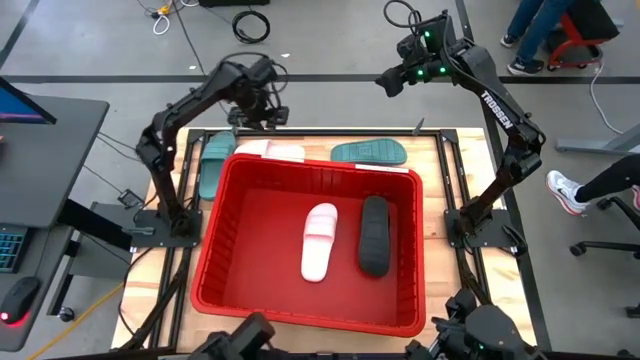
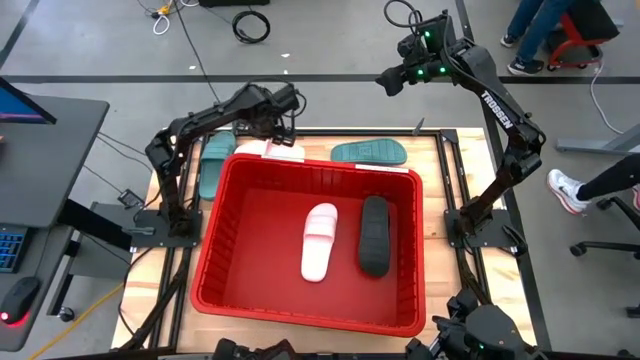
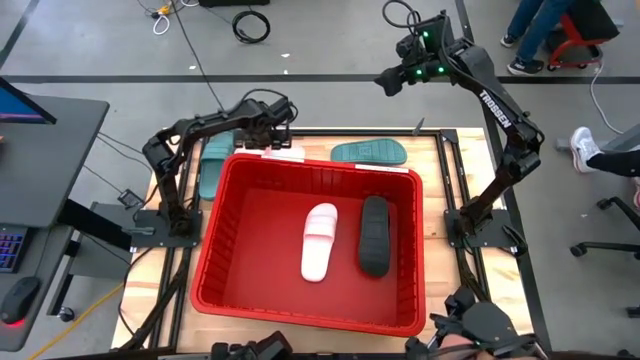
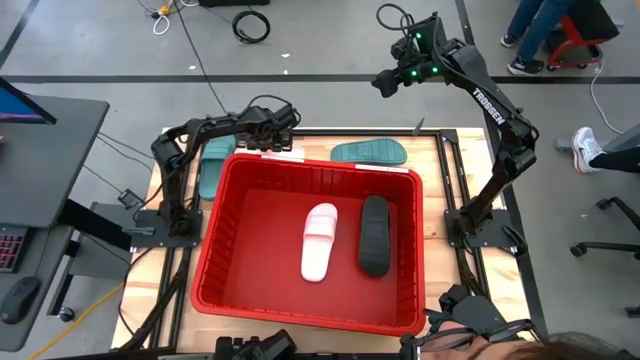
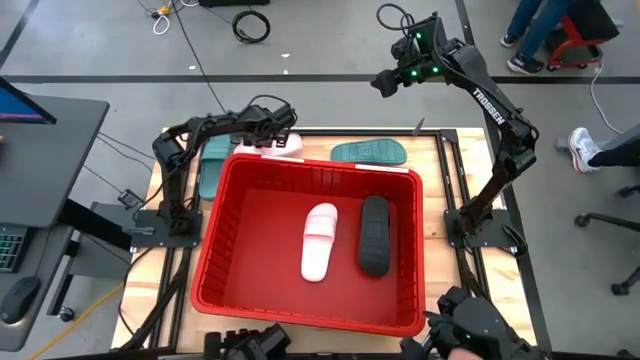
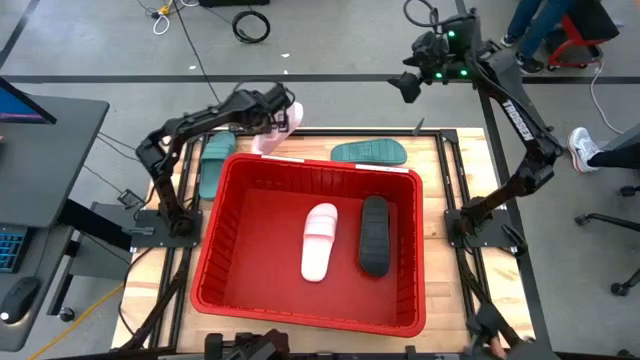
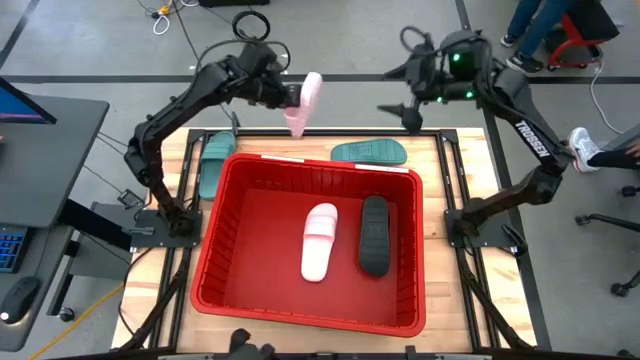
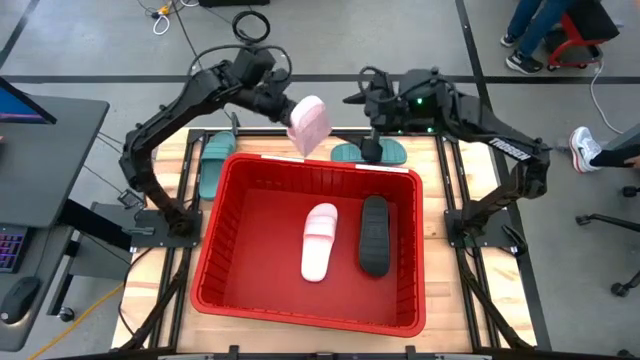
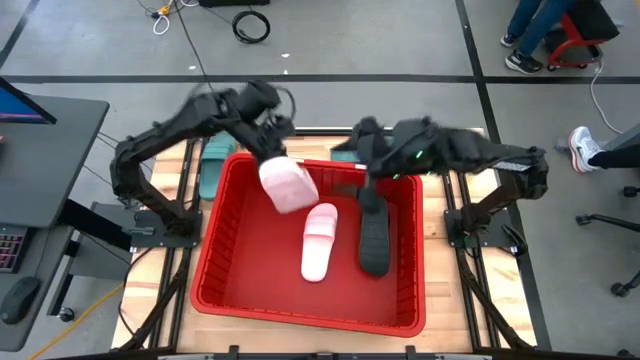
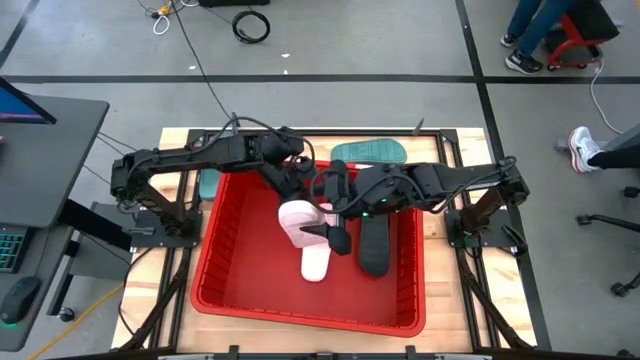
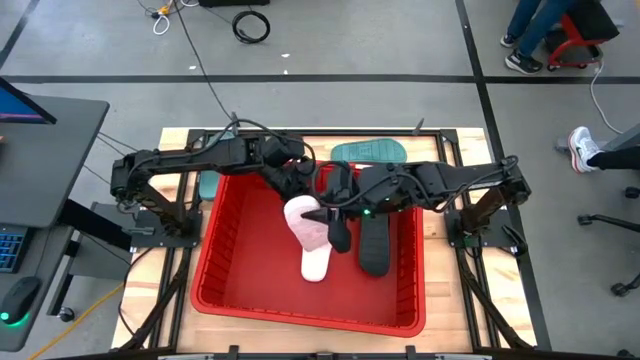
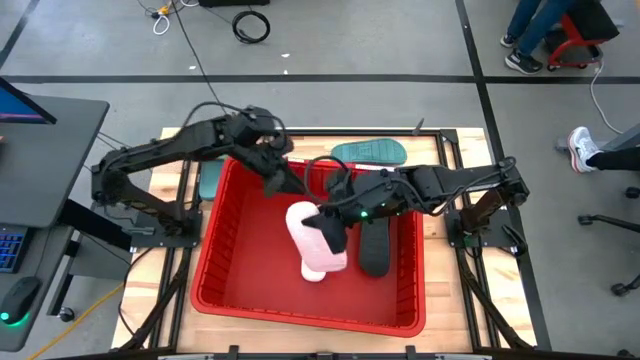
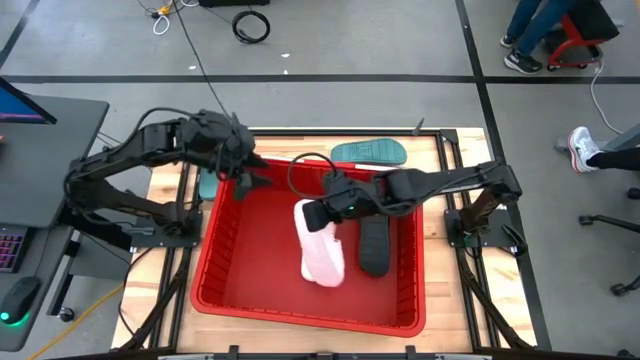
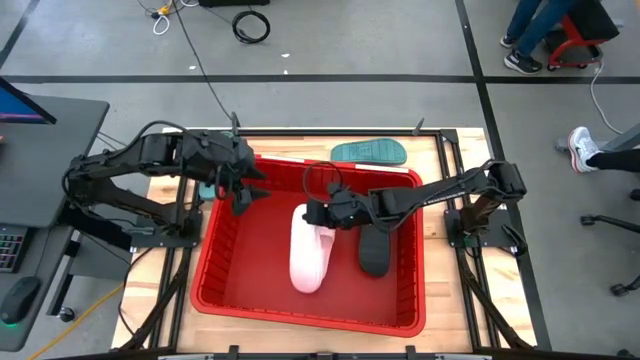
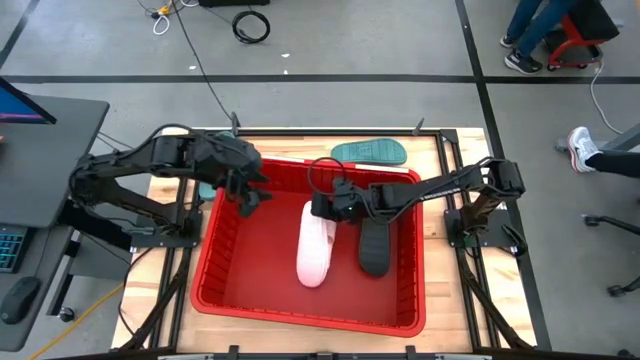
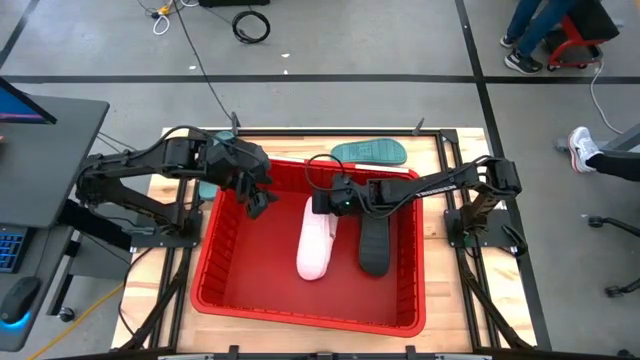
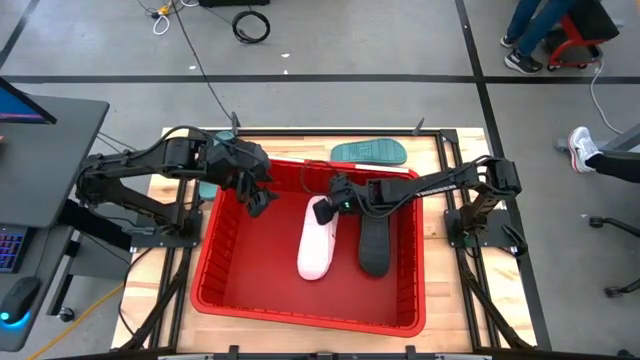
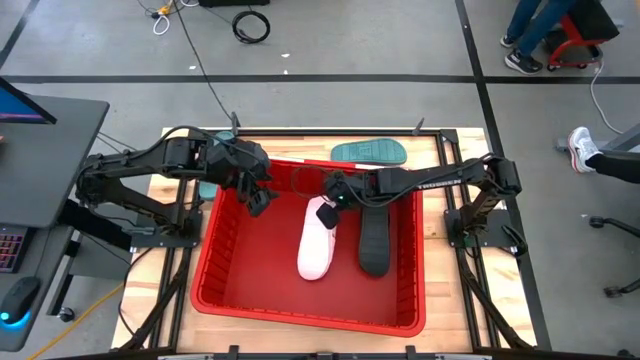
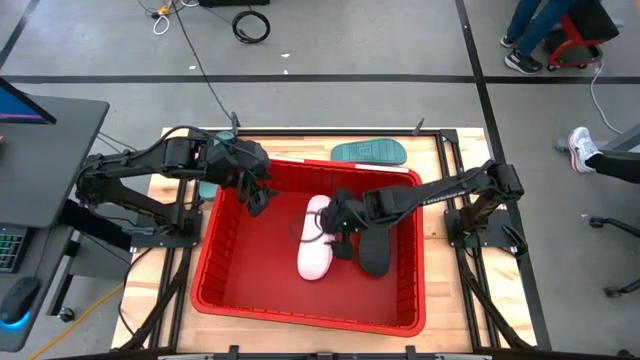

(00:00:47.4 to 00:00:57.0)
Task: Pick and place slides into bin
Stack the pink slide on top of the pink slide in the red bin

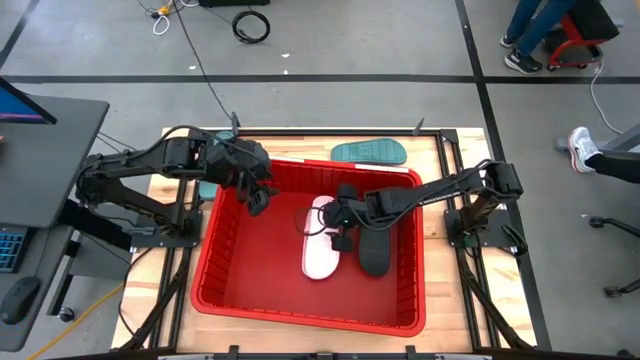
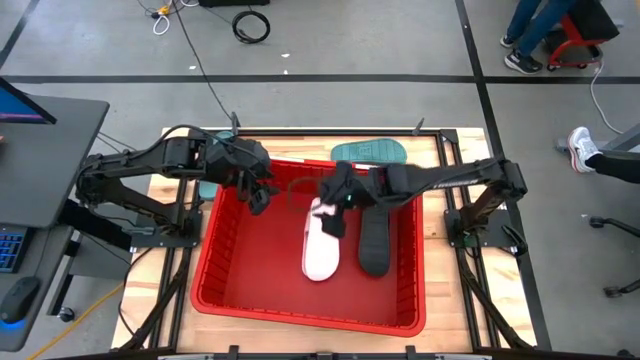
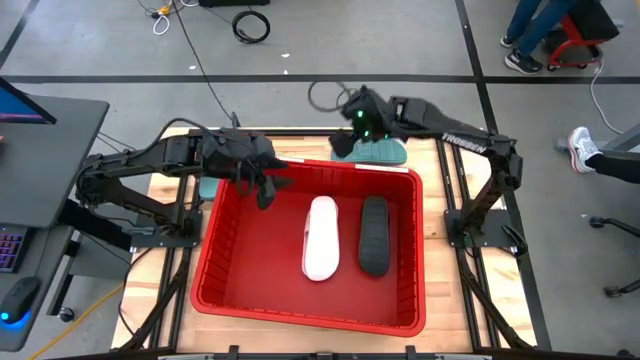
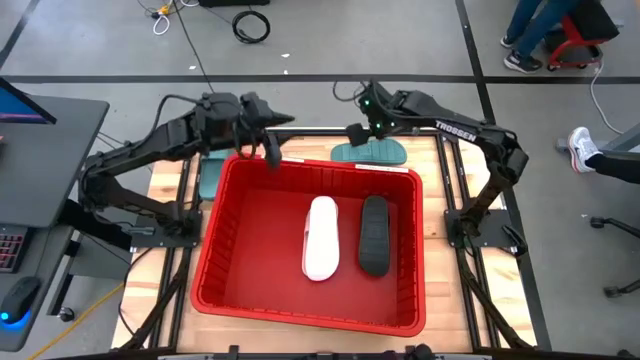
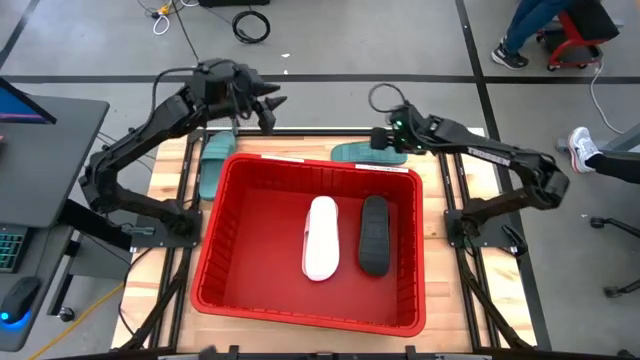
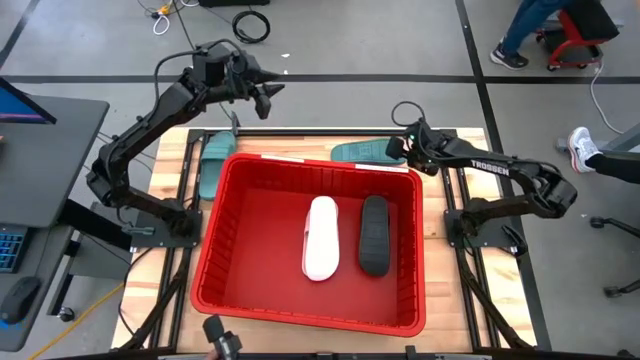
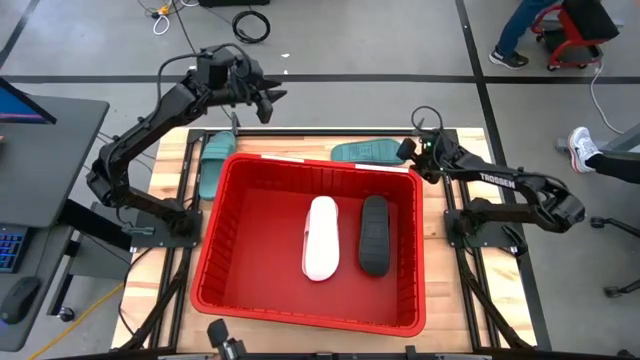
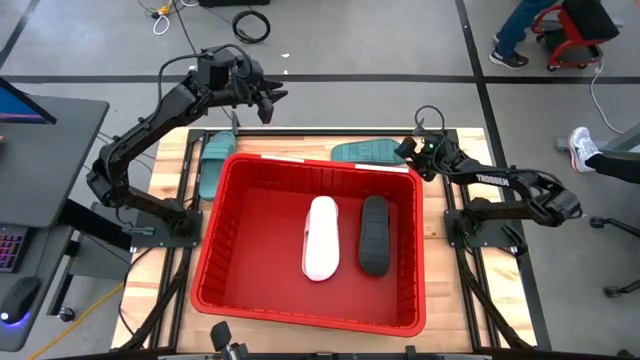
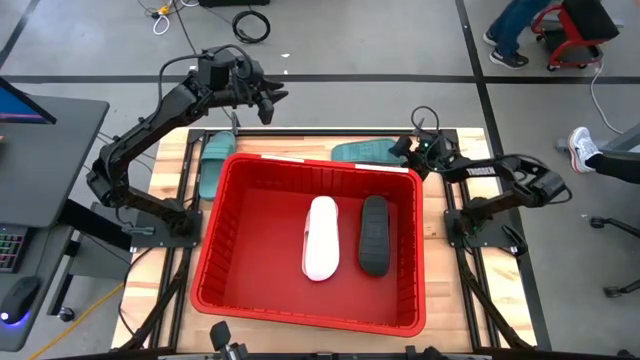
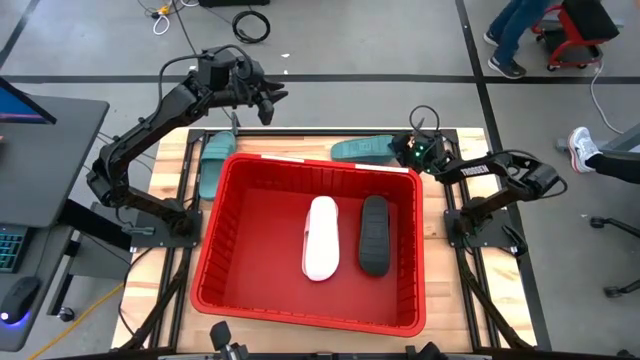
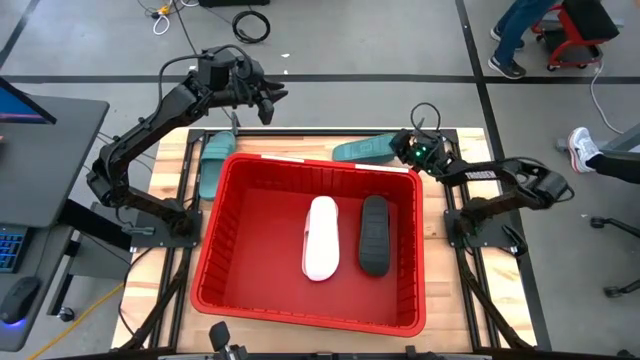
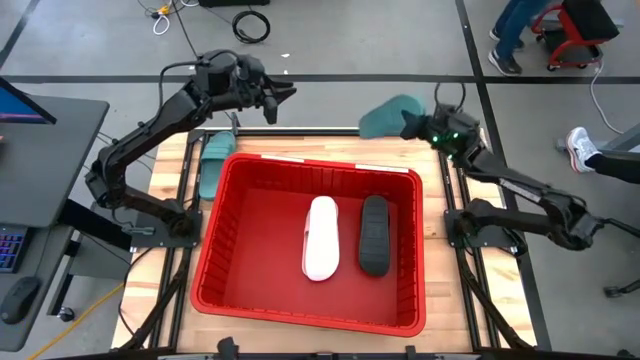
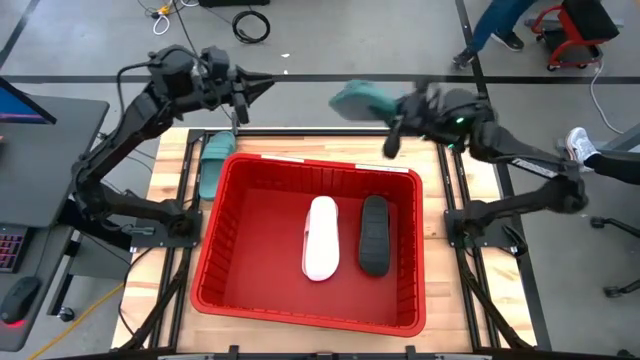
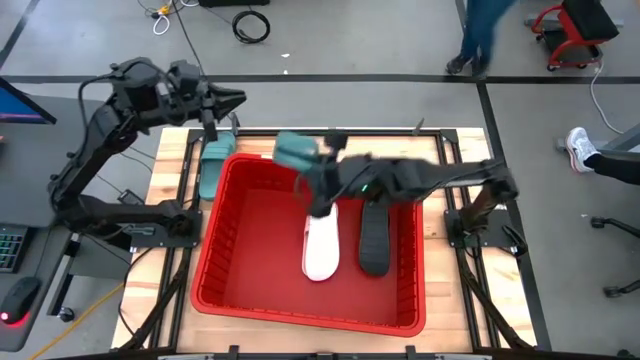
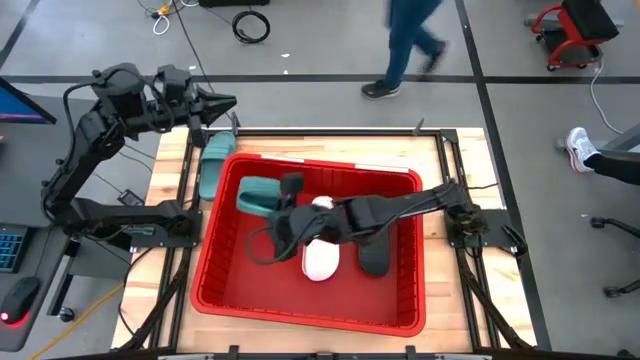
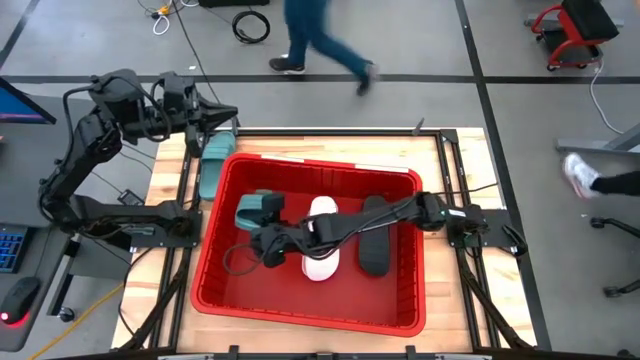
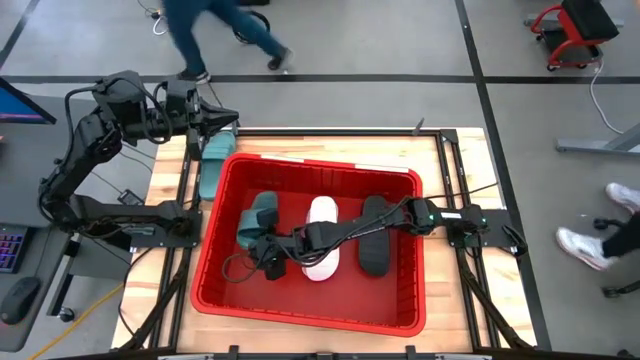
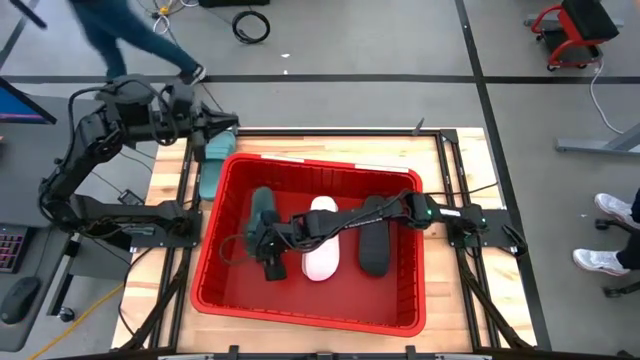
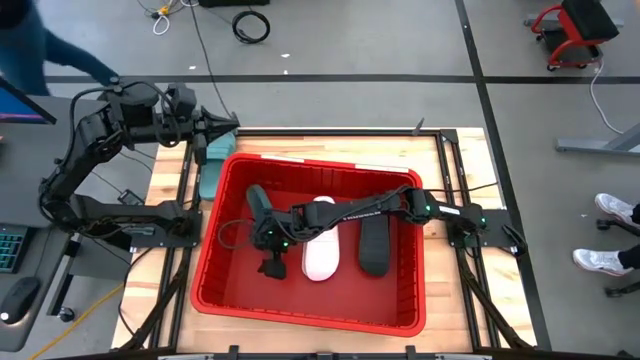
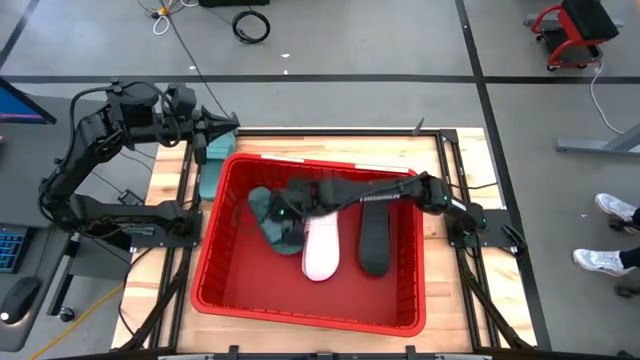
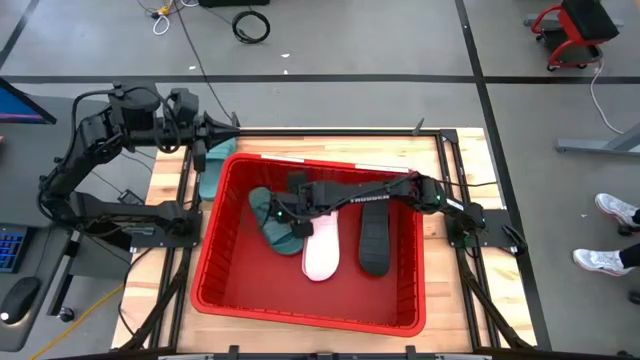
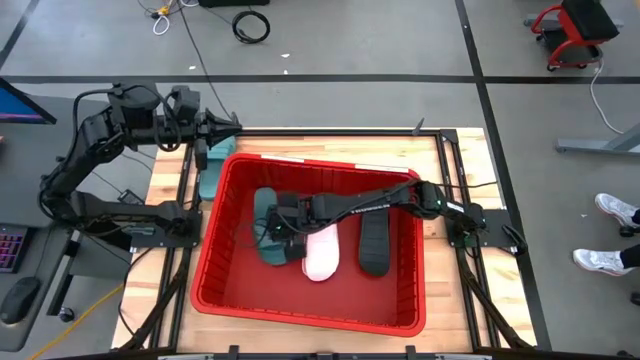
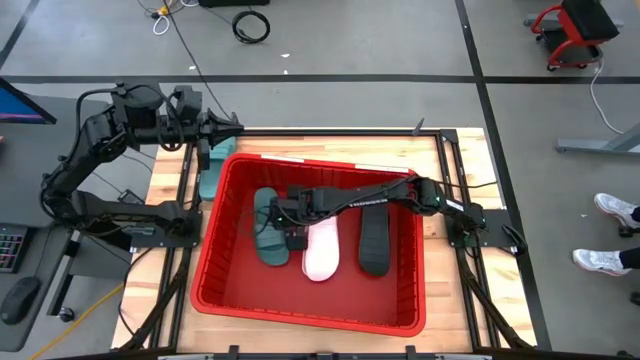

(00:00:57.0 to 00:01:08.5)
Put the right green slide into the red bin

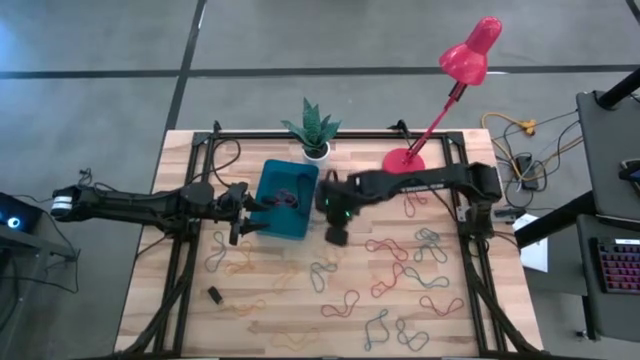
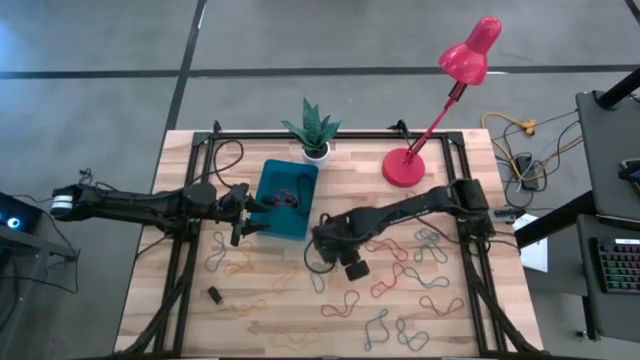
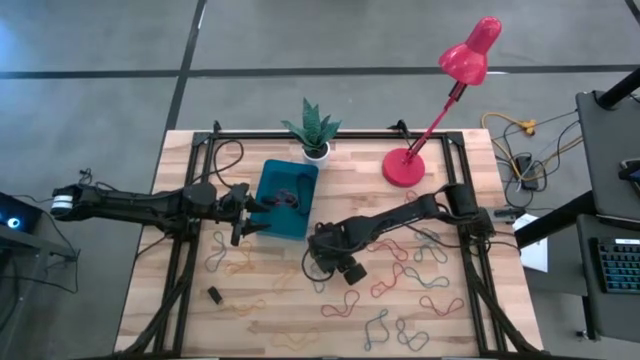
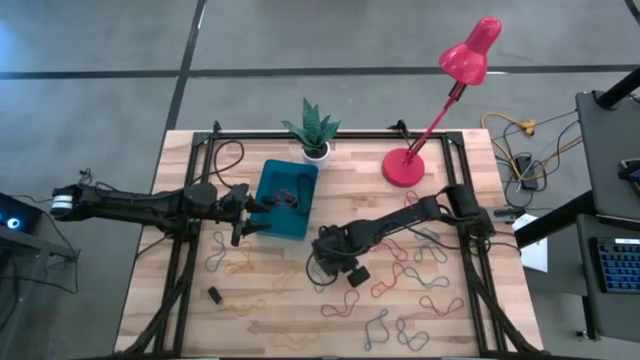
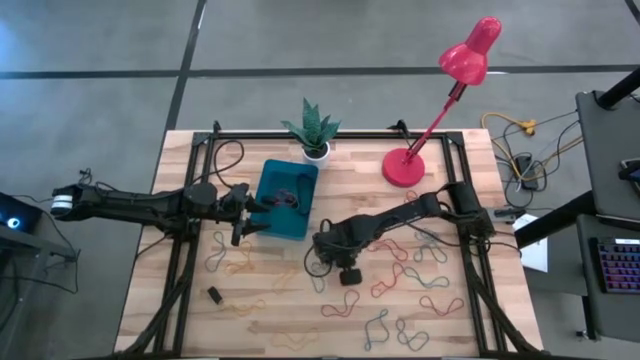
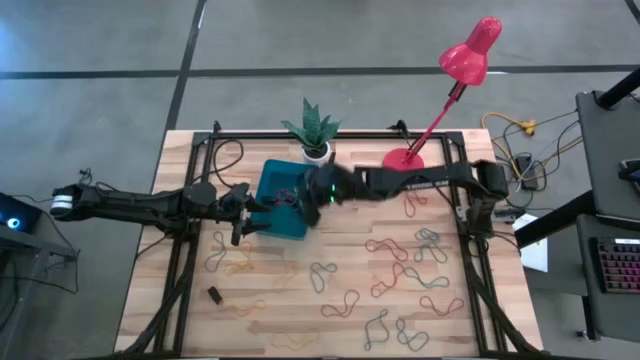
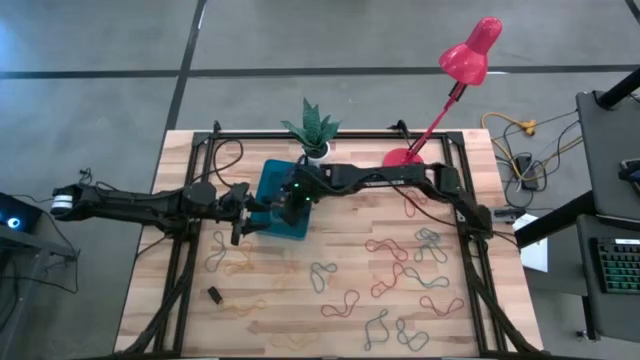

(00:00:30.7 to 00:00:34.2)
Task: Pick and place rubber bands into bin
Put the yellow rubber band into the blue bin
